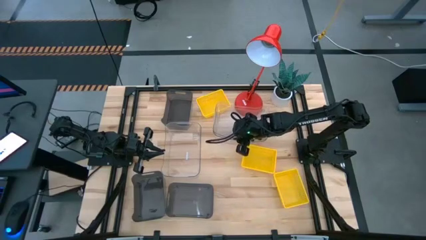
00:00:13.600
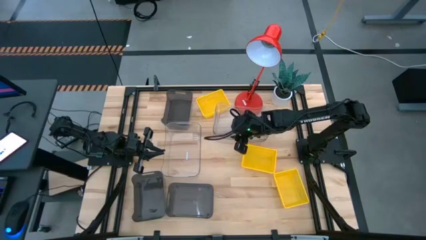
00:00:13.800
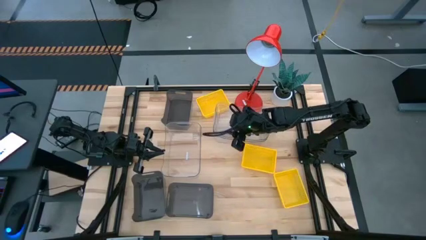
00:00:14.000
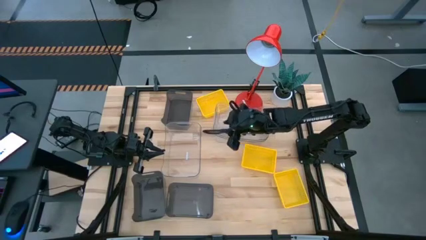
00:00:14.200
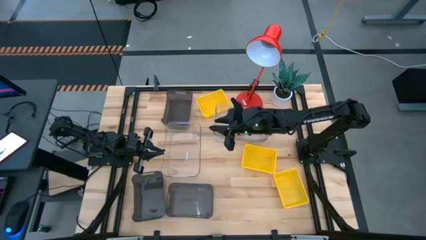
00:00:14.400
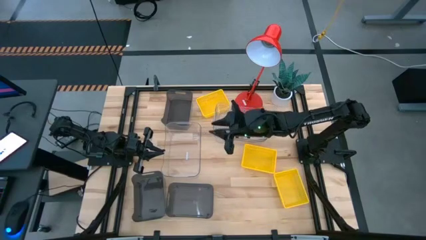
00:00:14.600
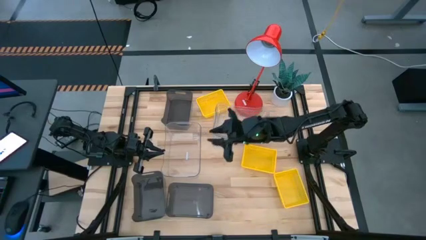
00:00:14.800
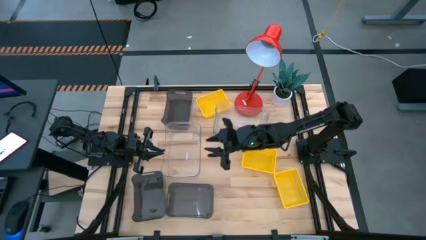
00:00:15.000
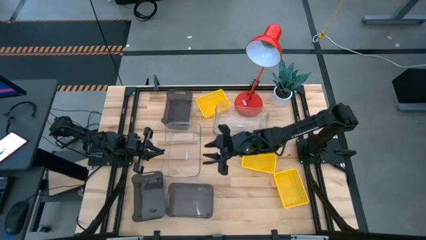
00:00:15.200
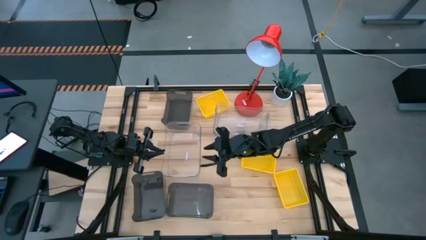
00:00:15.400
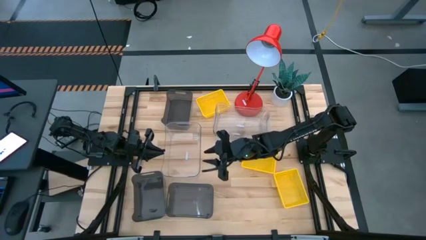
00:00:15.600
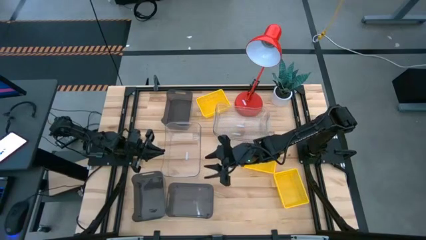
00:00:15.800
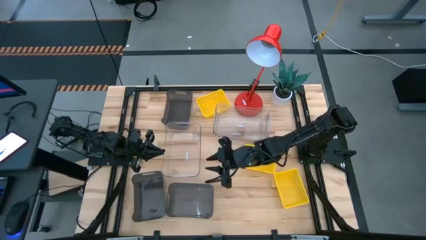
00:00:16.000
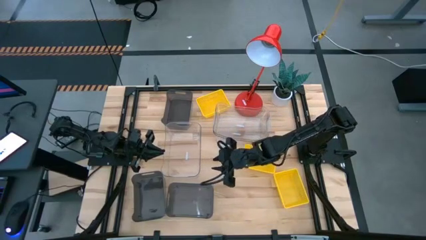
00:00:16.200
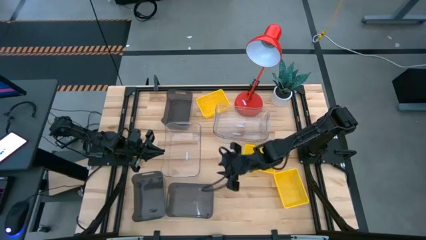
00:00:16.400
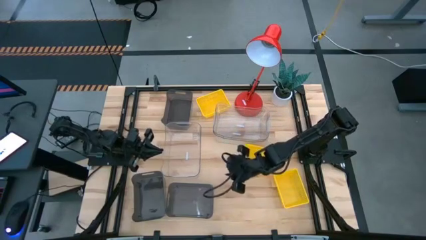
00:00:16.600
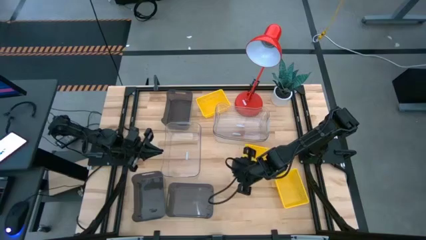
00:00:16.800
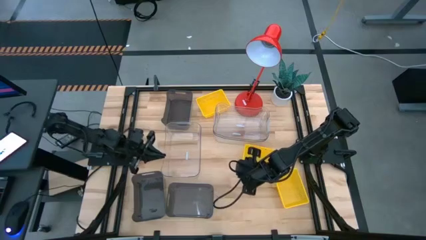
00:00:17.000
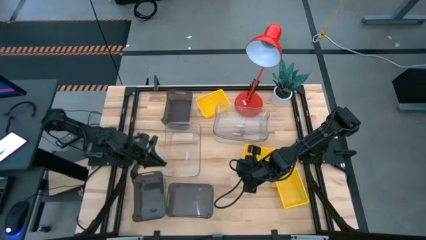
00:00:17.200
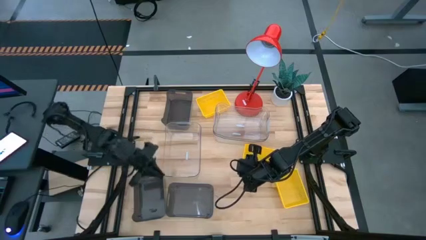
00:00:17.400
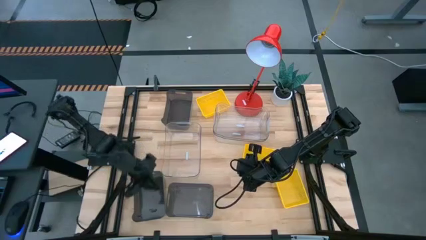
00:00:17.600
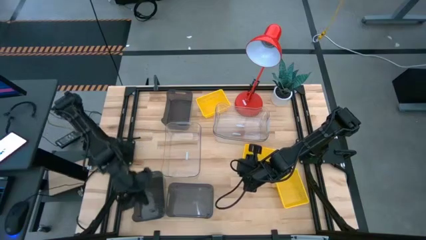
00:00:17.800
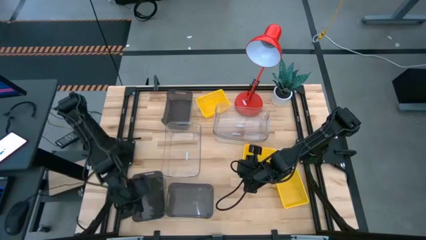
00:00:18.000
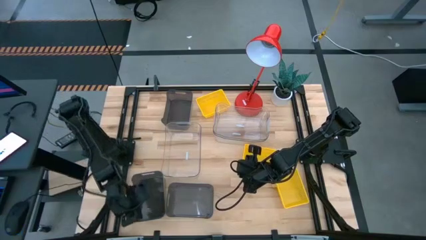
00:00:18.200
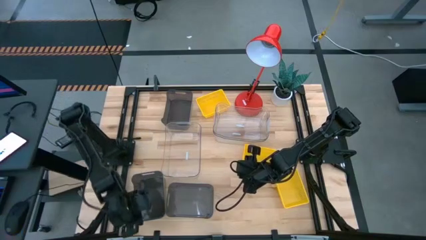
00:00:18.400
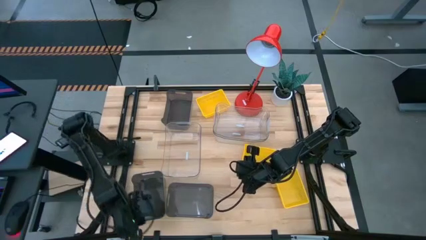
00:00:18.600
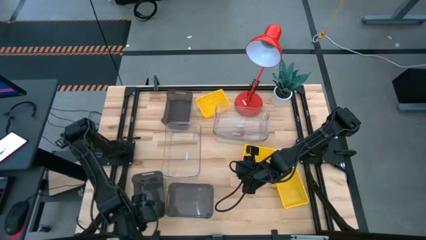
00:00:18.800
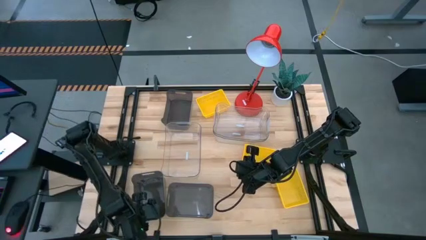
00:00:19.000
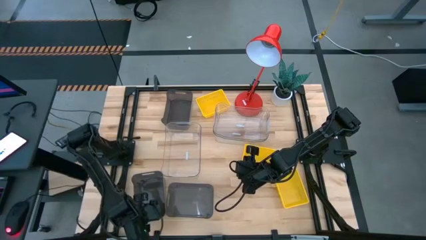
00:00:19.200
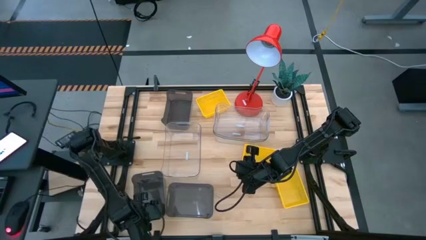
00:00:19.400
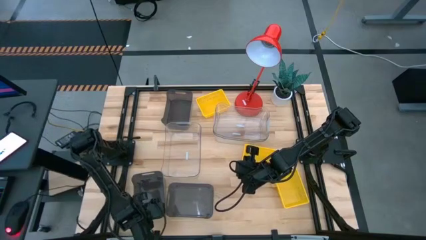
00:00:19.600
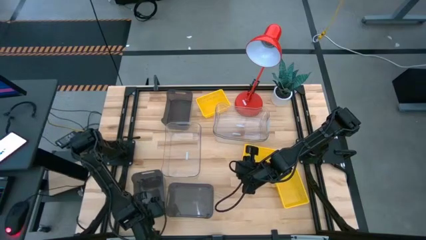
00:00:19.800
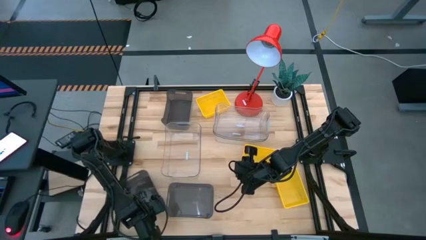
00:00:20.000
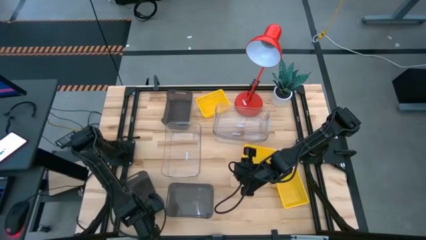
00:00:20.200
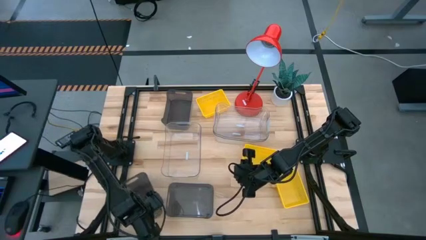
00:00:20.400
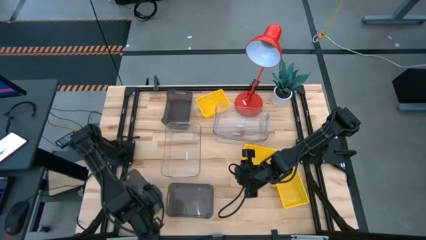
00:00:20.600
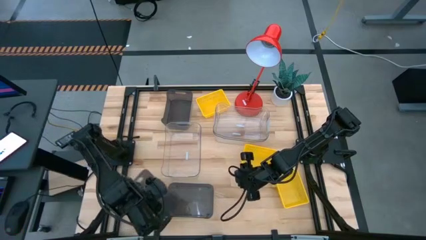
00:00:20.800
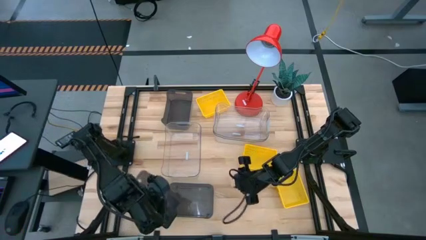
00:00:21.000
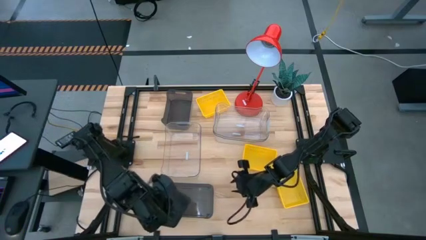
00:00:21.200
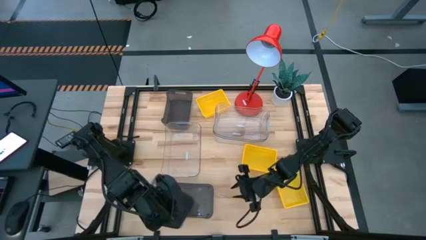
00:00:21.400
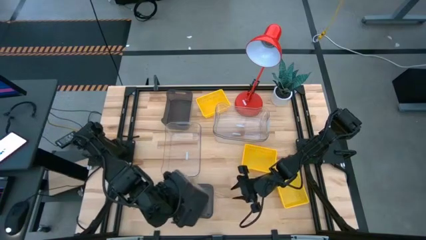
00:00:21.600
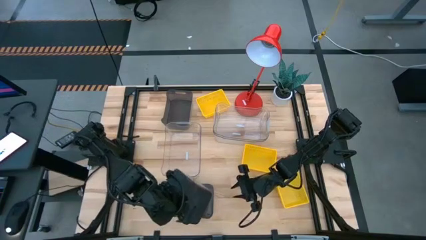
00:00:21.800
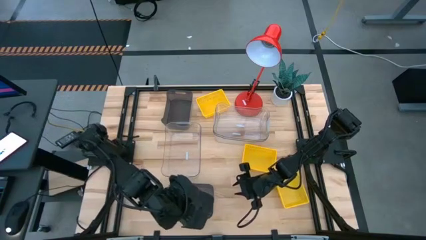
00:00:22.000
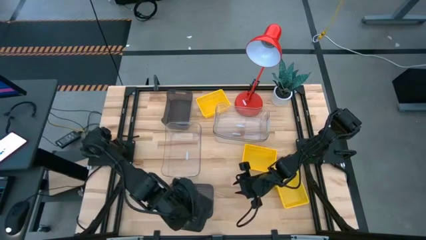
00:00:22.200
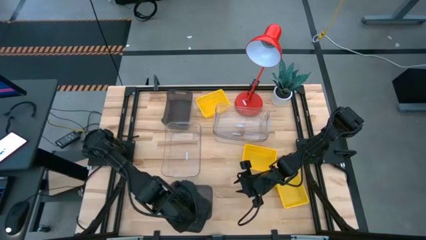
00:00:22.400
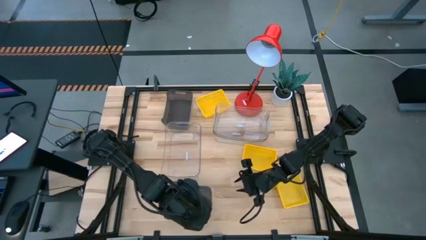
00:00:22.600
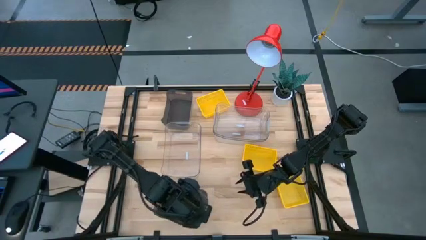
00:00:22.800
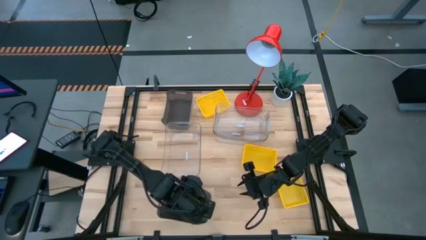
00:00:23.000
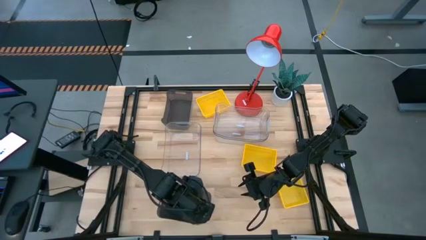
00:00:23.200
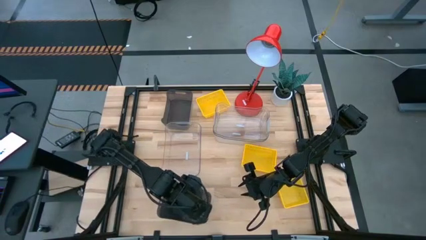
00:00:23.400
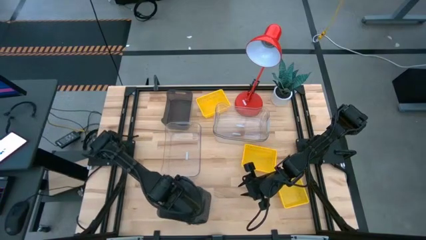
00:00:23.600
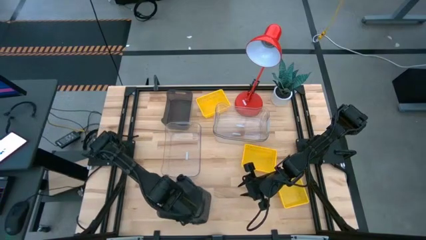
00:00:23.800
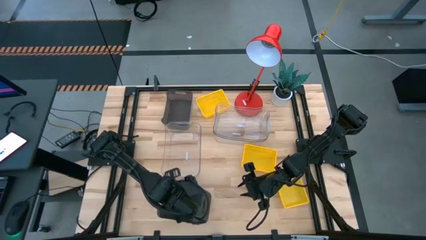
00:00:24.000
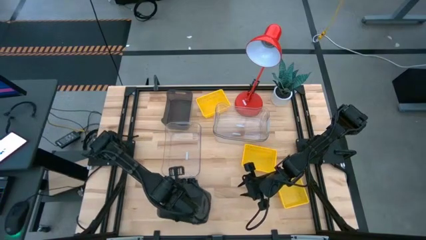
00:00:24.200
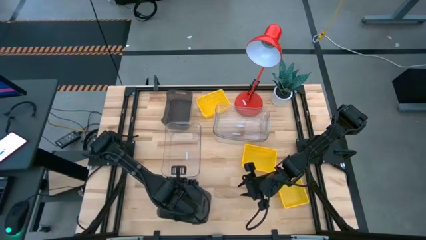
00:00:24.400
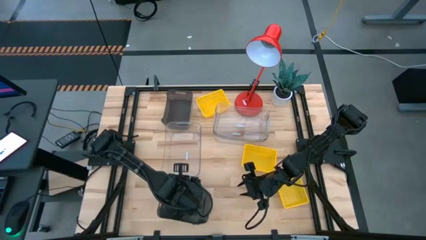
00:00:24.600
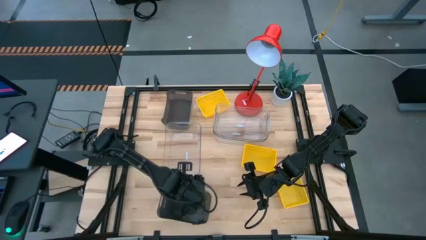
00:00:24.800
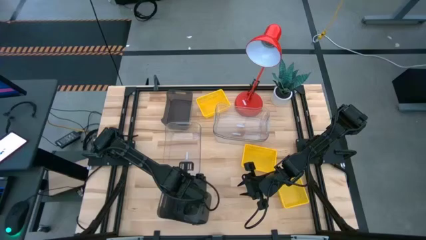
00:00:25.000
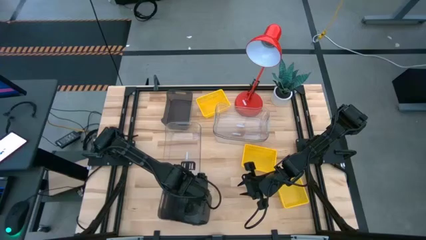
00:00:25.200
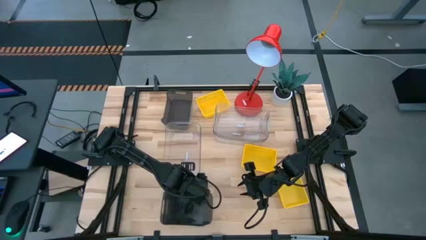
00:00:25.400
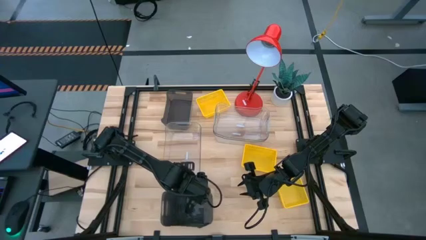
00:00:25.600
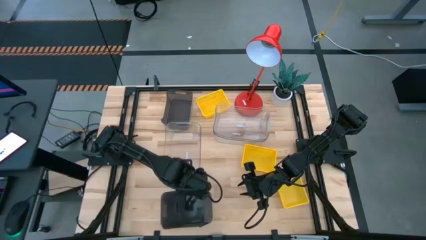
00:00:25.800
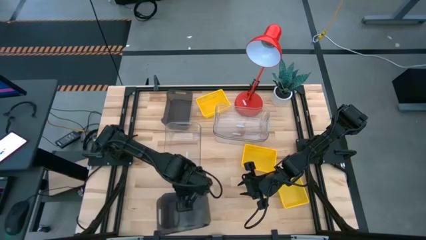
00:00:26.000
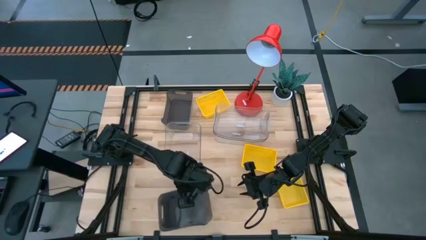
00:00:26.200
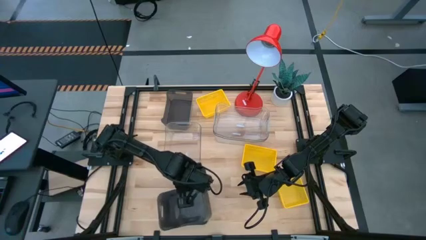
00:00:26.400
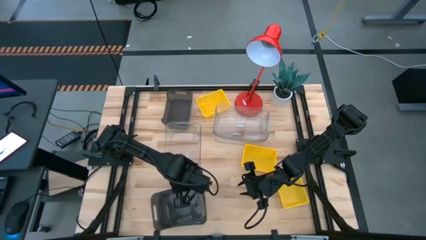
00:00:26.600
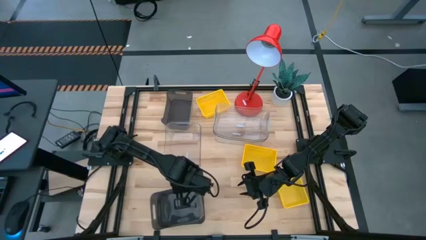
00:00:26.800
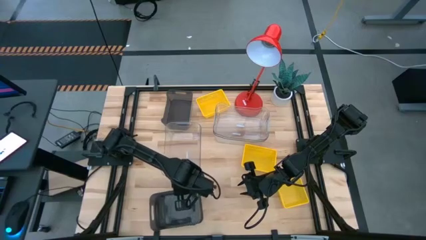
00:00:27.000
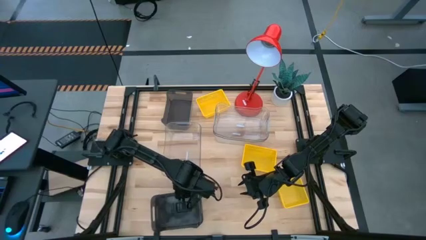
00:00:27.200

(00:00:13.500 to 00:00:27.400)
Stack the left black bin on the right black bin
